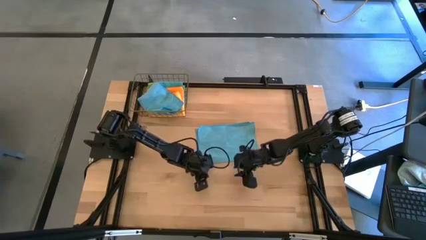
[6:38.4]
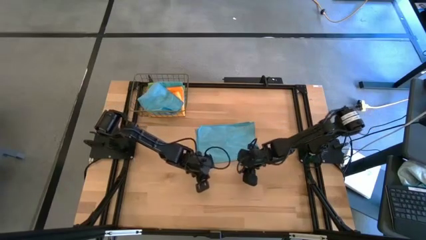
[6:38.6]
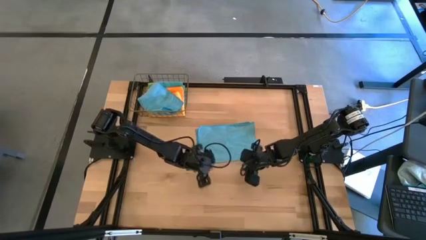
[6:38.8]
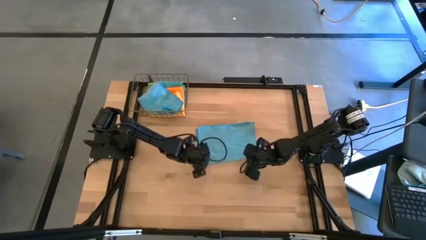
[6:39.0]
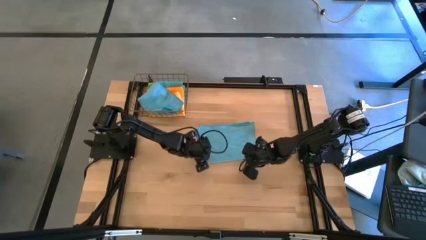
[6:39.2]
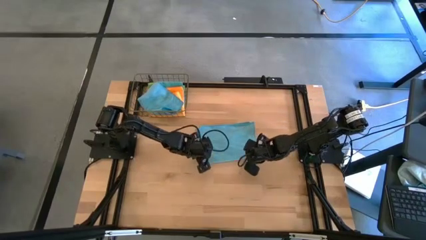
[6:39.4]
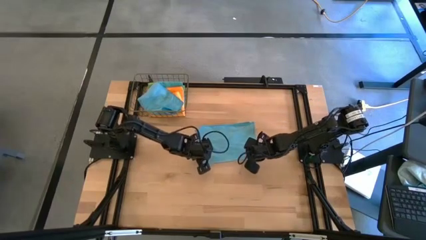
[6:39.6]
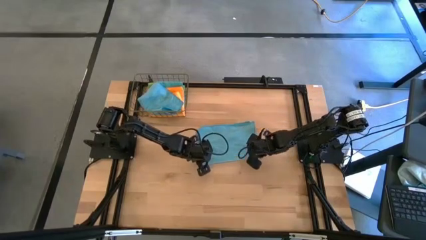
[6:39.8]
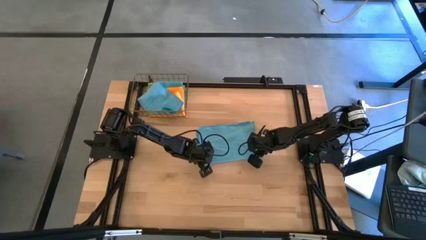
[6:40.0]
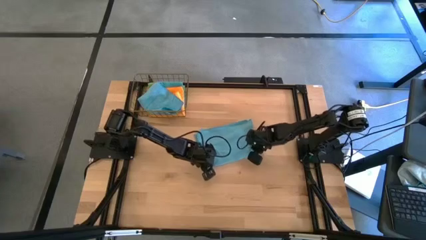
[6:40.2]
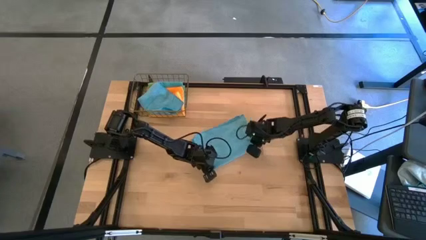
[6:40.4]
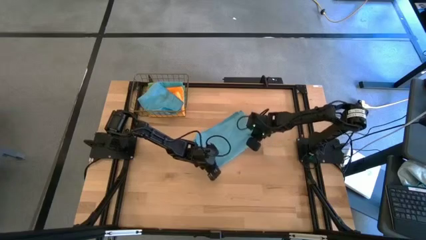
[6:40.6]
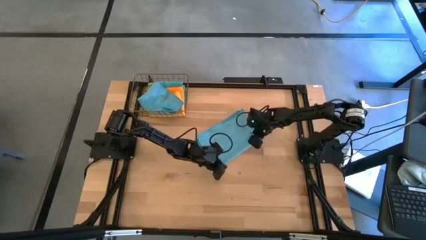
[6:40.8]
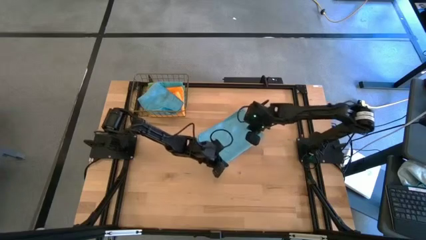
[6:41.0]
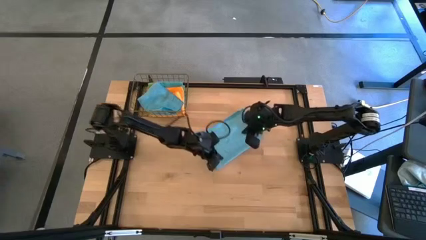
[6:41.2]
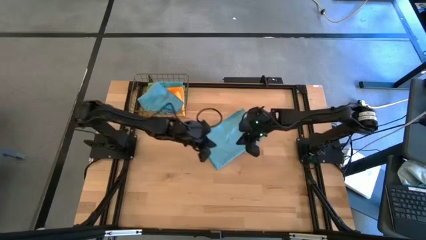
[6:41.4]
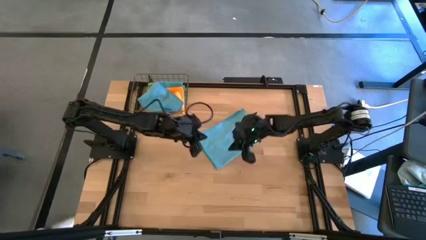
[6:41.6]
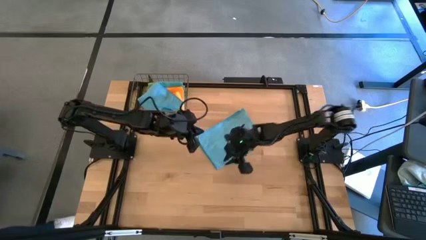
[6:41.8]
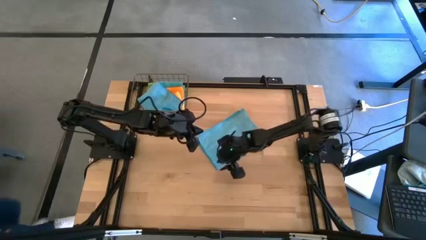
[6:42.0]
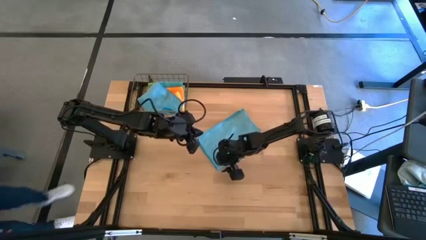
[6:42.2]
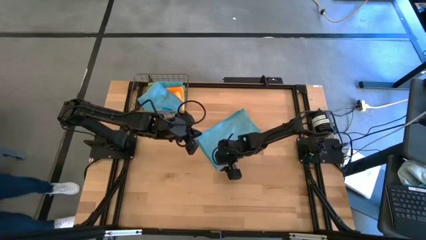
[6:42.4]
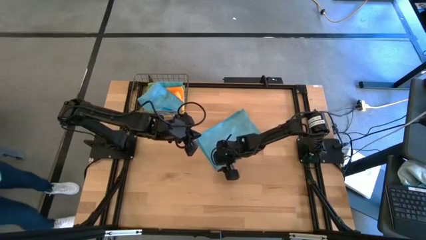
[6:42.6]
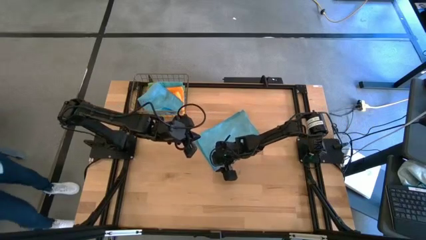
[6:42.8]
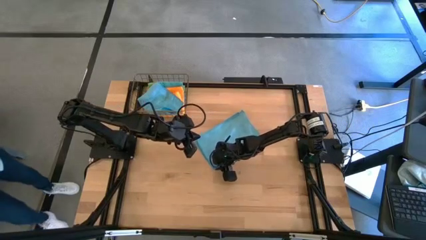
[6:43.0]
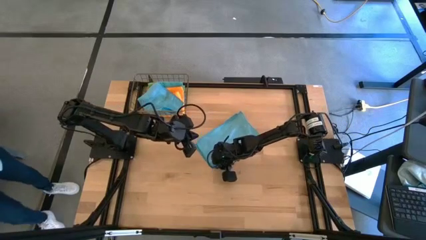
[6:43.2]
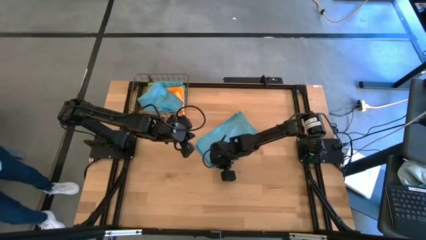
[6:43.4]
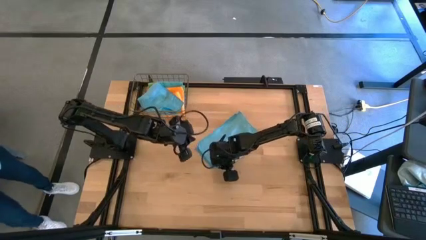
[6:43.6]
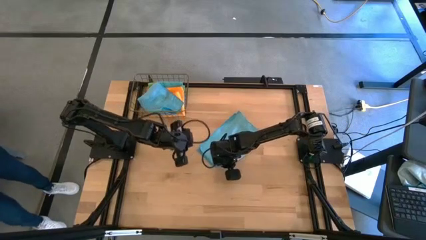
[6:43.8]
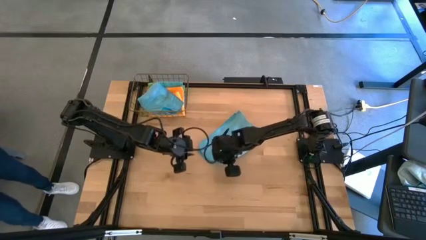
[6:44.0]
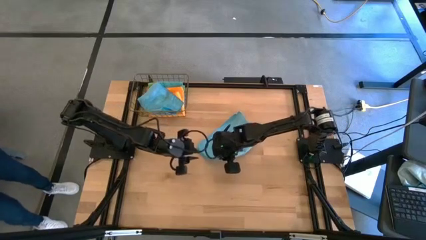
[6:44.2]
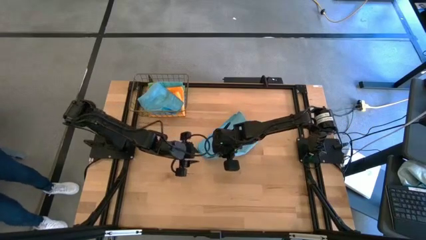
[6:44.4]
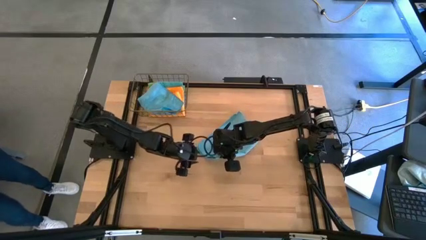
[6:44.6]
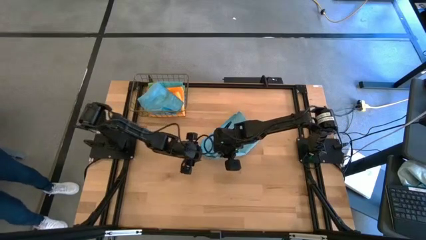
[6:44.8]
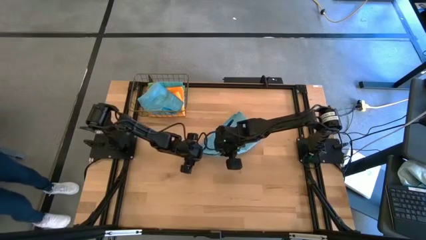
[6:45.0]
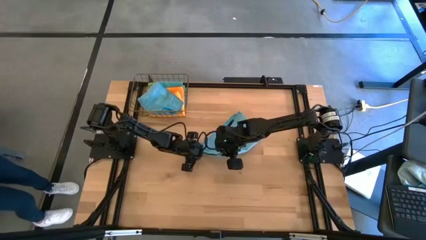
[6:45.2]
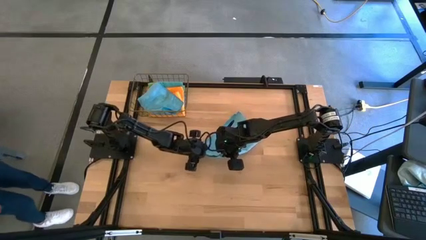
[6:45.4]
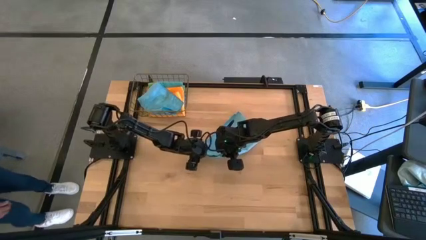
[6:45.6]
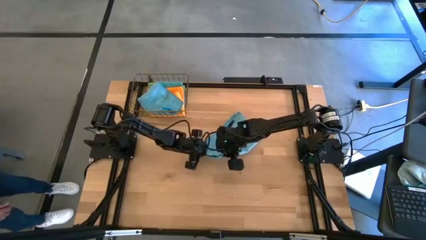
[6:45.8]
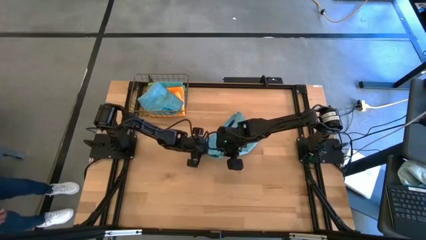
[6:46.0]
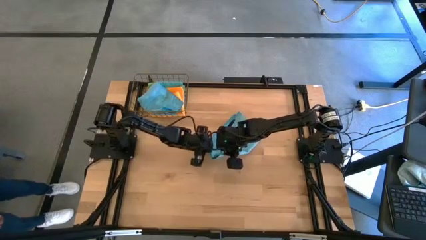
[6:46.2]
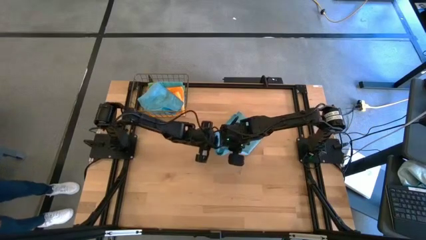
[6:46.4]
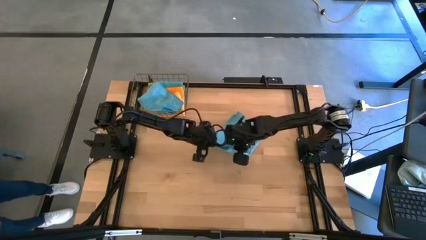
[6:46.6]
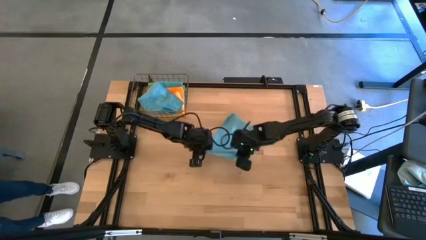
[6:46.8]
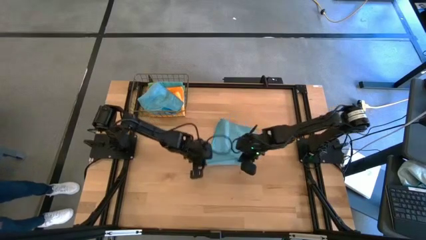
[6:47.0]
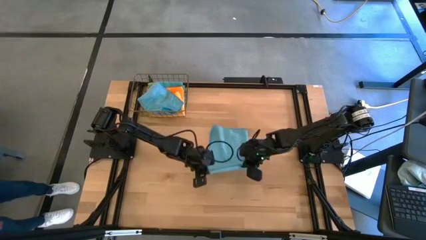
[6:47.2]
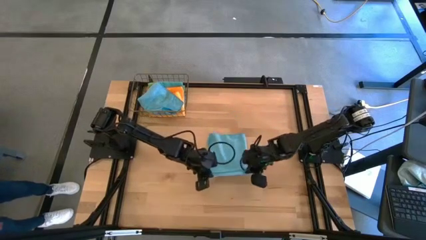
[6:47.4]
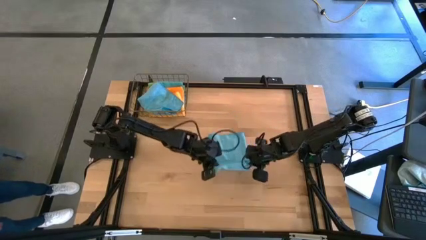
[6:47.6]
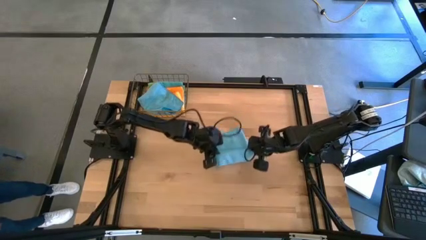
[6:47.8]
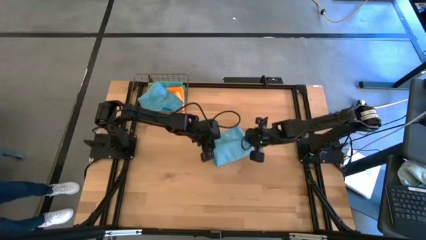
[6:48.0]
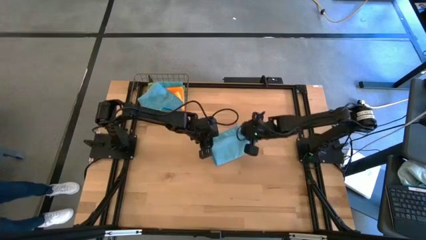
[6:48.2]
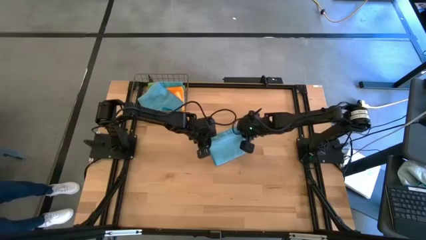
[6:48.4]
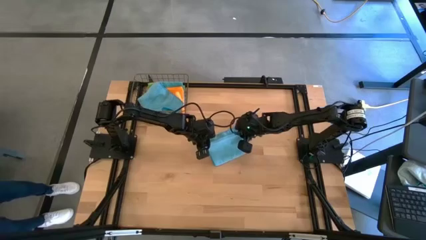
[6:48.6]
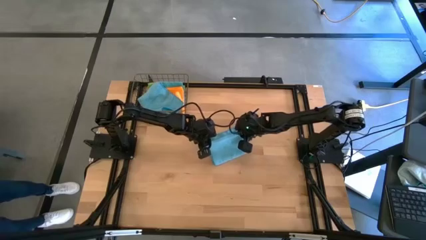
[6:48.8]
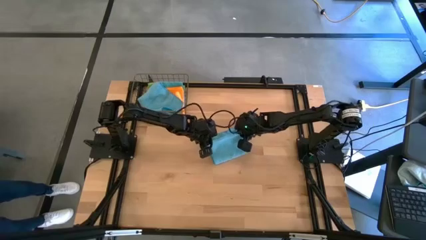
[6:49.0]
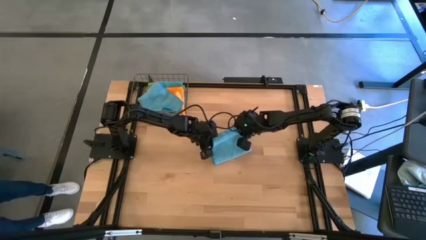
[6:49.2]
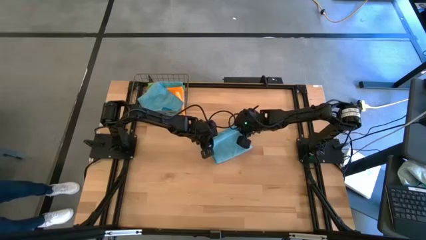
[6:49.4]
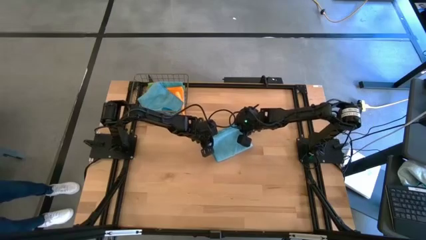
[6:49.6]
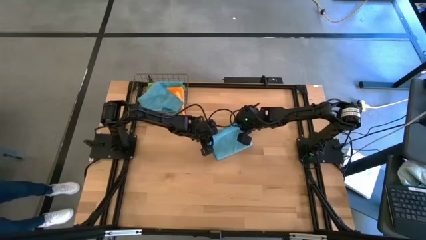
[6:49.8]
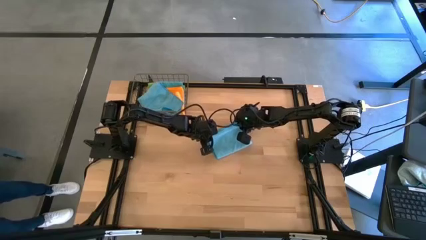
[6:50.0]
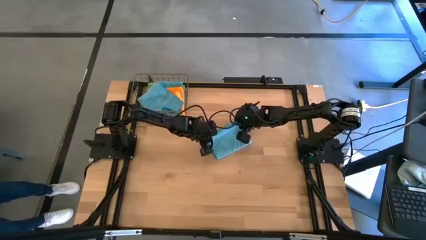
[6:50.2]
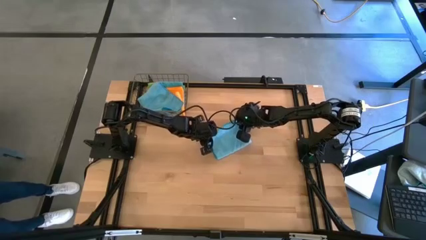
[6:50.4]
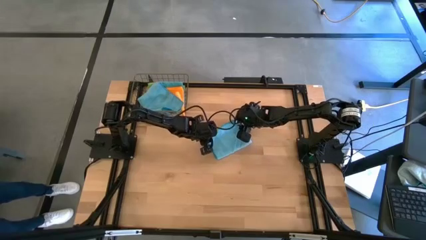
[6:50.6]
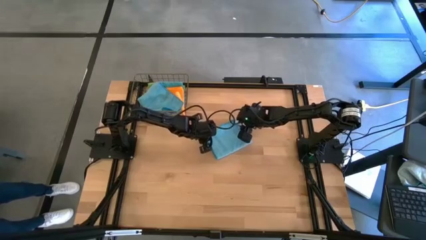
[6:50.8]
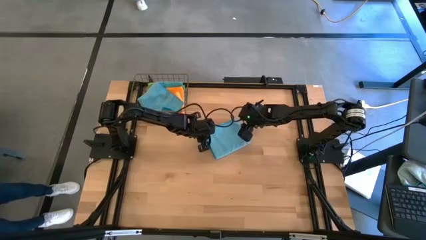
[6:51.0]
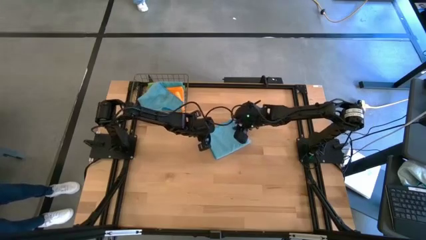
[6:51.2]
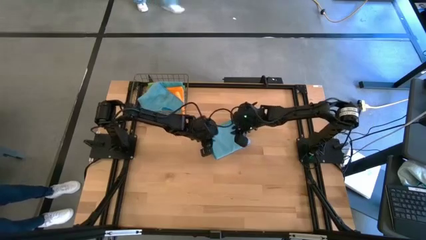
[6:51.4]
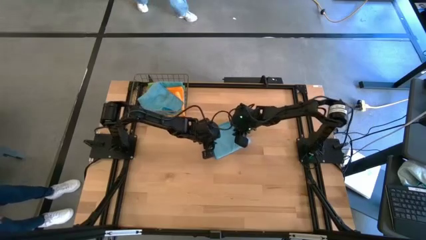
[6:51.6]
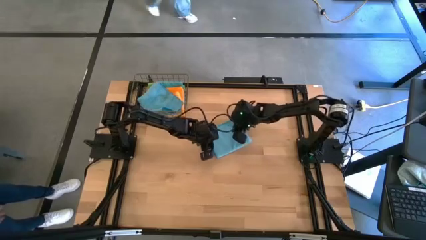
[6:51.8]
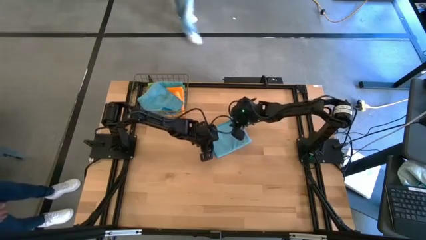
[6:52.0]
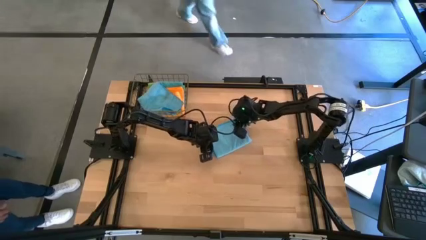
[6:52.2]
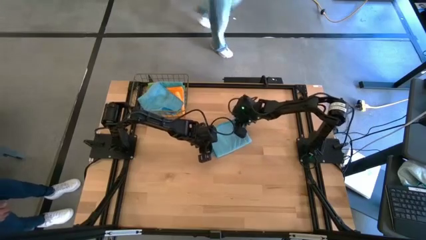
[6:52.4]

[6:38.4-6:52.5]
Task: Fold microfiber towels
Fold the light blue microfiber cloth
